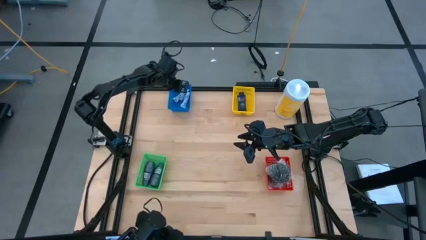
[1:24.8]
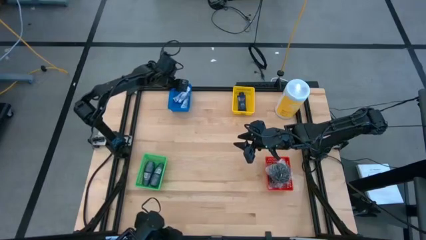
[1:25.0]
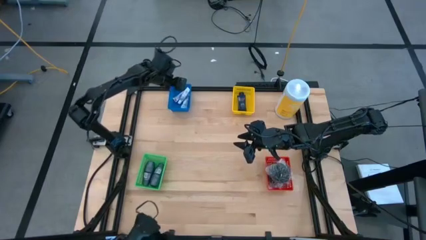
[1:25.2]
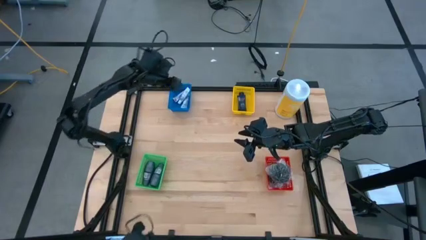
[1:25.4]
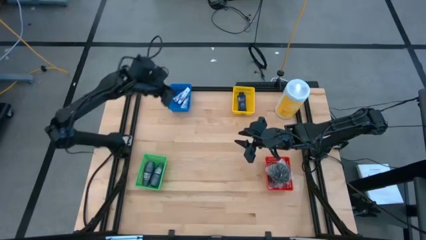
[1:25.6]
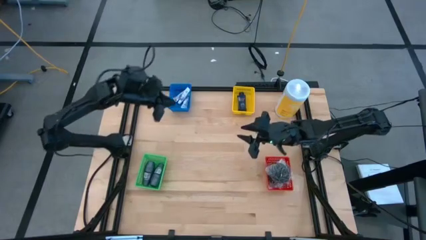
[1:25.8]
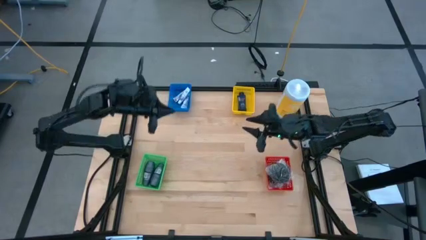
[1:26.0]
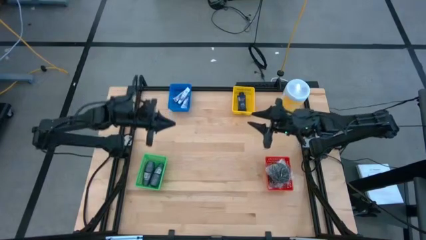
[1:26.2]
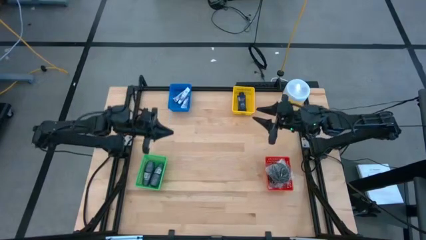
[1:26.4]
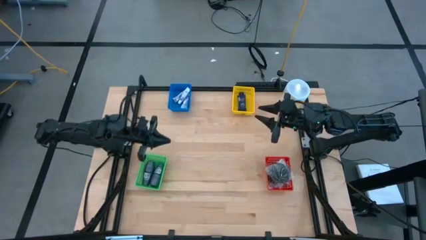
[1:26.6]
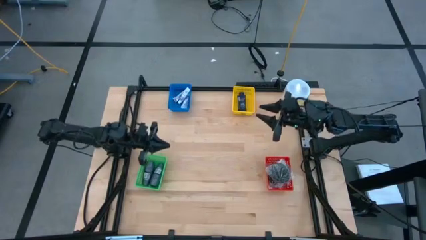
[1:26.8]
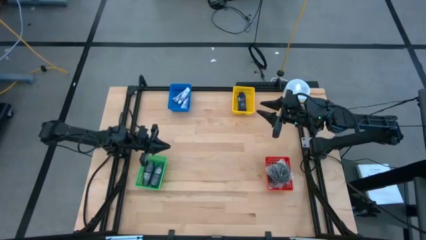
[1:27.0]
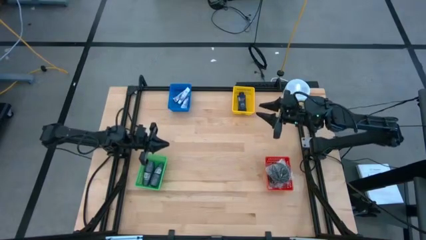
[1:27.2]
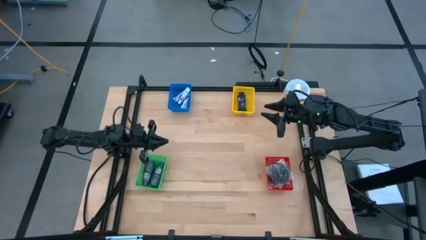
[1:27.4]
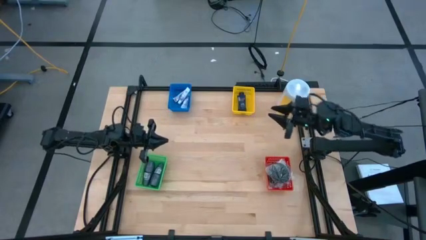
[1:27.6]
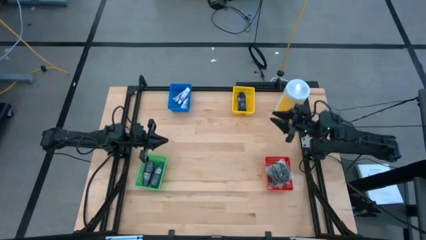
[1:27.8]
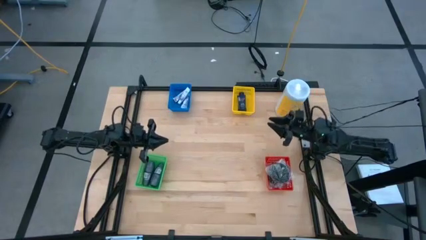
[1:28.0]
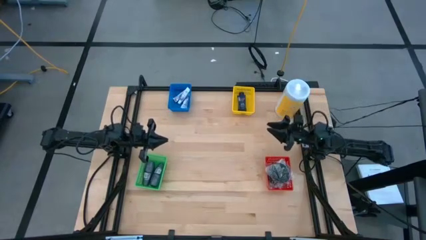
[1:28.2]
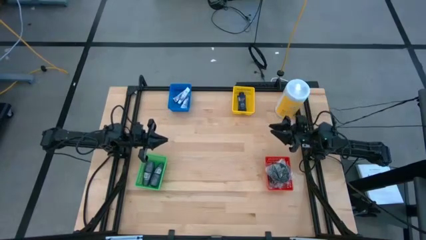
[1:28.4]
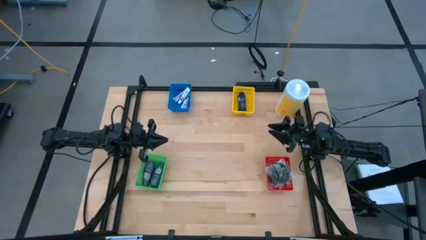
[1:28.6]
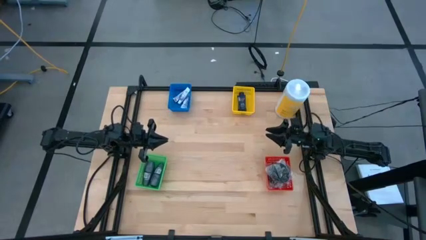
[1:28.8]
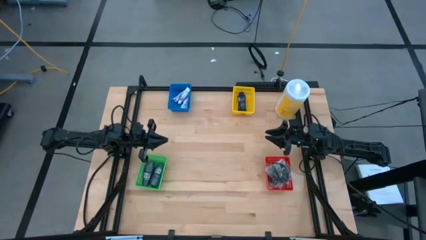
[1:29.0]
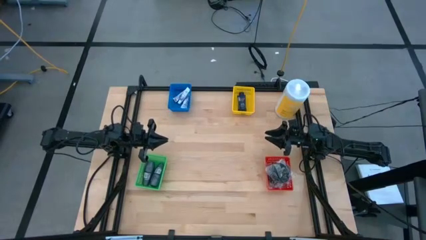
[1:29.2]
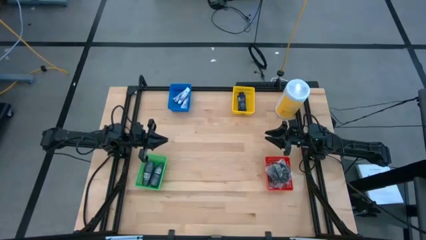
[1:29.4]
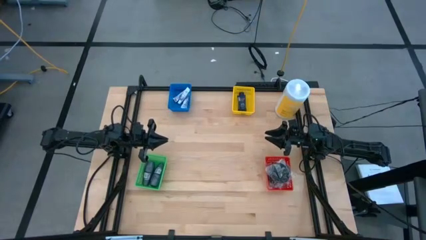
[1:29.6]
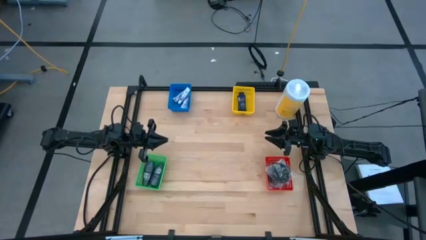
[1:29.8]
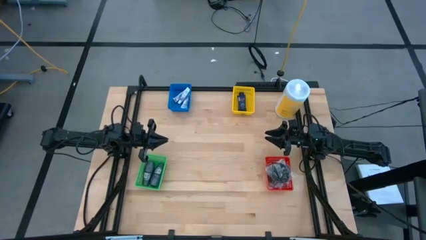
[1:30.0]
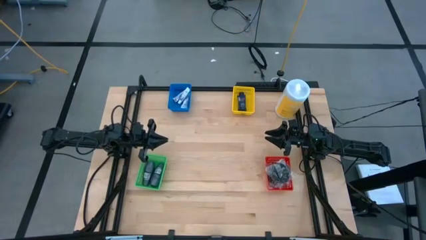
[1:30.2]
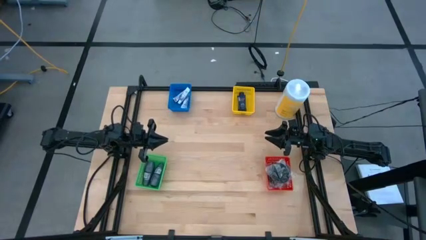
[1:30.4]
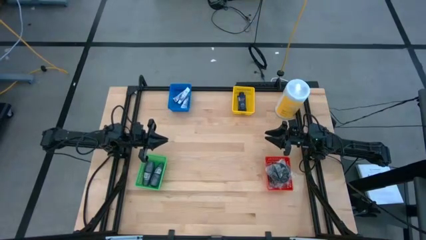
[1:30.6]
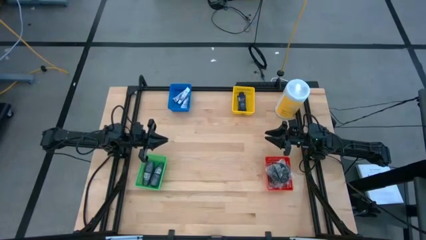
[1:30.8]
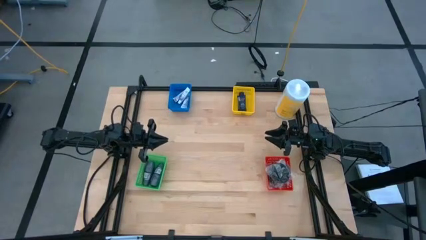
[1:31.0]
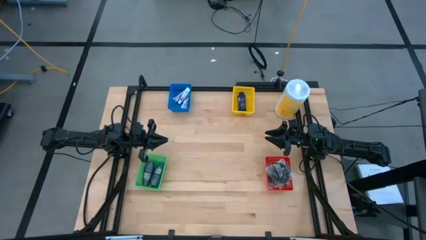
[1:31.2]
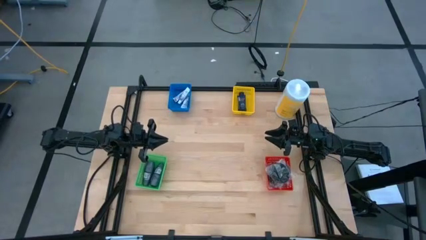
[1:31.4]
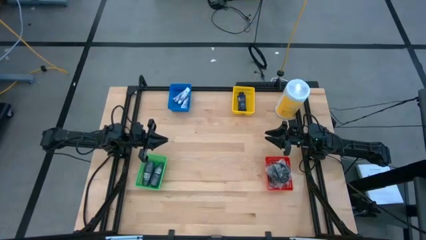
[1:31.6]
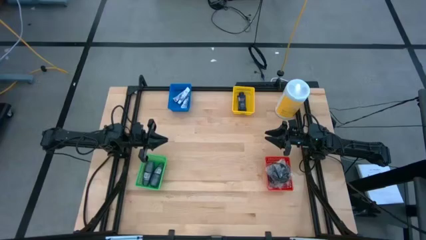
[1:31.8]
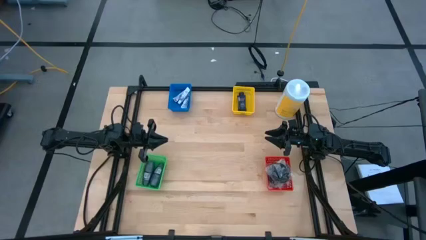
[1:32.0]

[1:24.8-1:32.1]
Task: Pick & Place Travel size toiletries
Return to Home Position

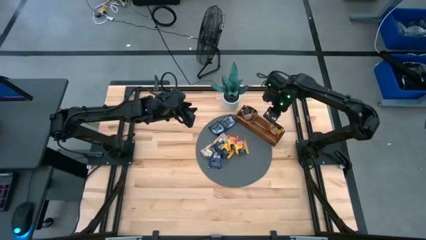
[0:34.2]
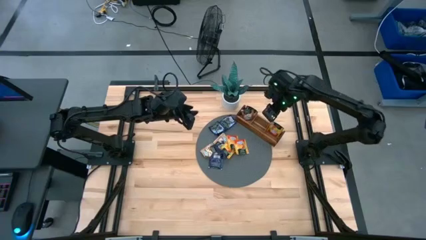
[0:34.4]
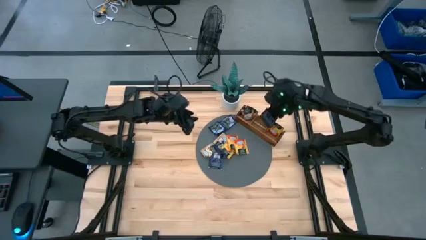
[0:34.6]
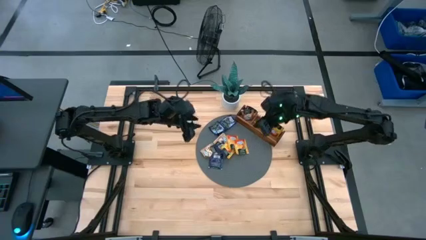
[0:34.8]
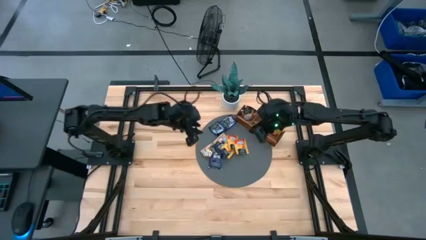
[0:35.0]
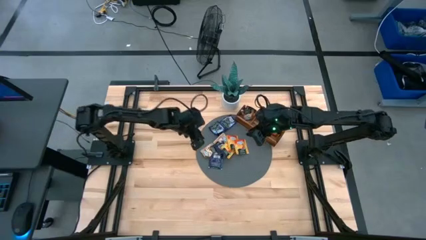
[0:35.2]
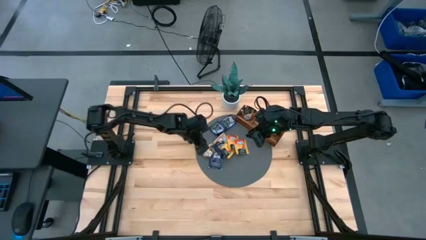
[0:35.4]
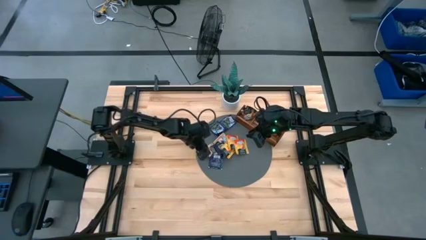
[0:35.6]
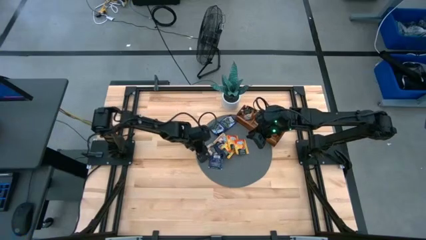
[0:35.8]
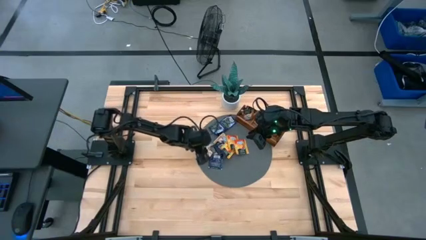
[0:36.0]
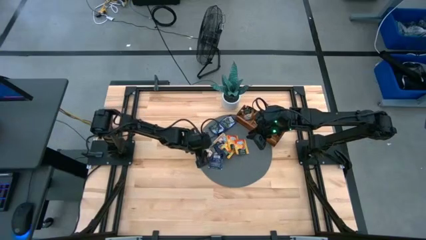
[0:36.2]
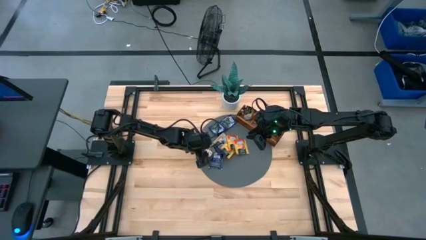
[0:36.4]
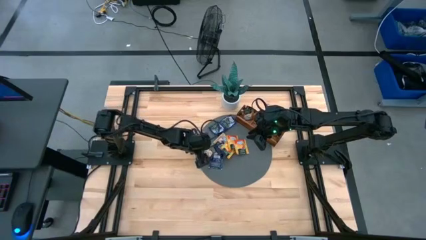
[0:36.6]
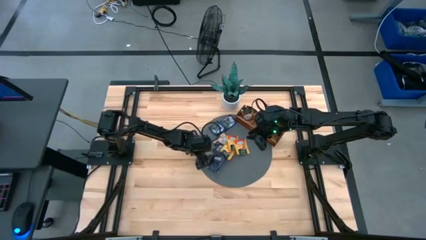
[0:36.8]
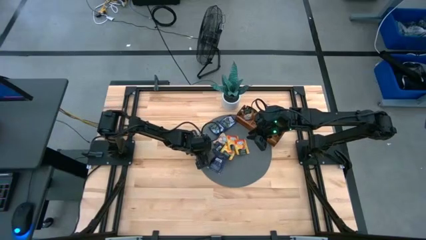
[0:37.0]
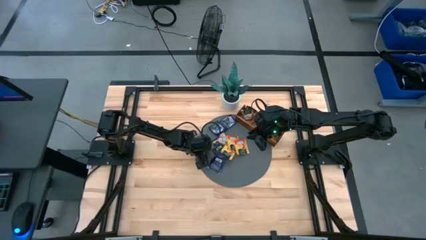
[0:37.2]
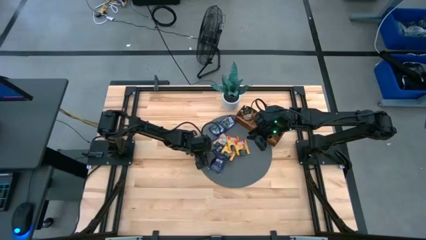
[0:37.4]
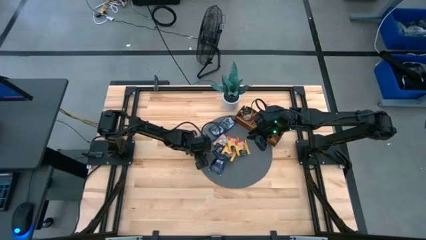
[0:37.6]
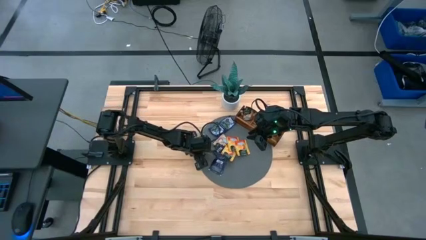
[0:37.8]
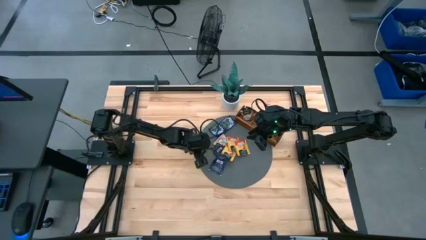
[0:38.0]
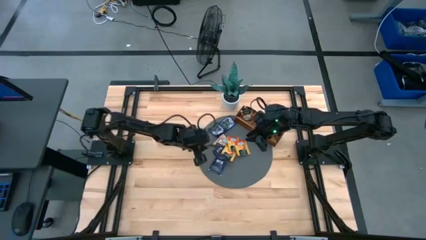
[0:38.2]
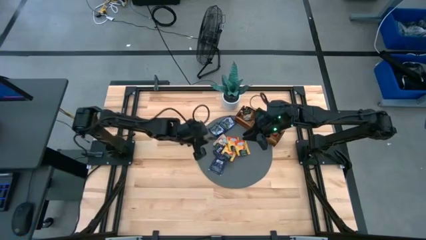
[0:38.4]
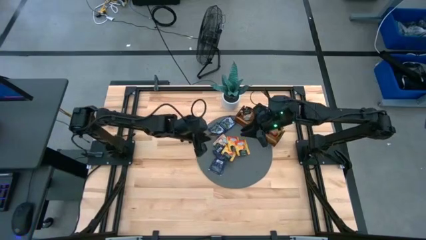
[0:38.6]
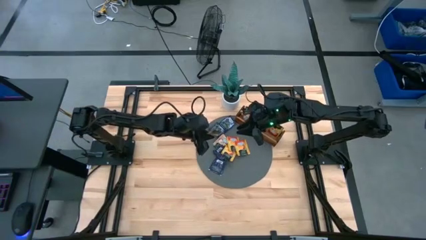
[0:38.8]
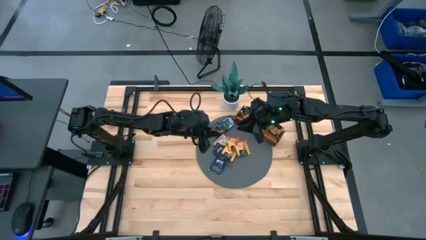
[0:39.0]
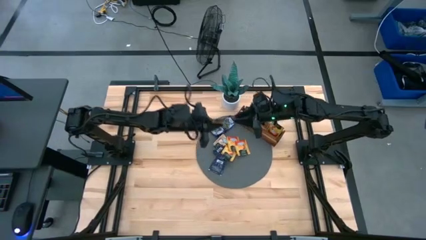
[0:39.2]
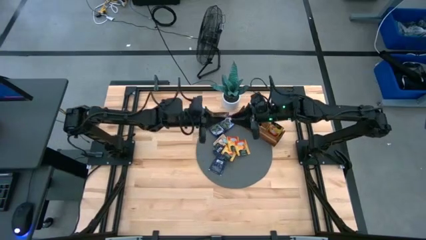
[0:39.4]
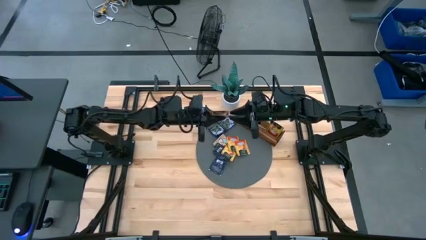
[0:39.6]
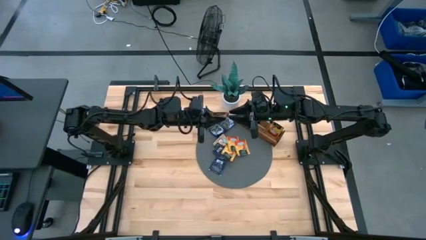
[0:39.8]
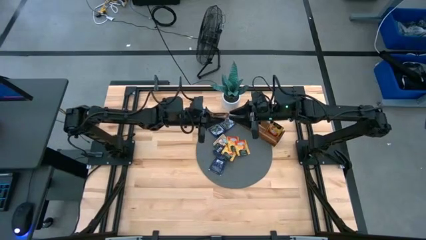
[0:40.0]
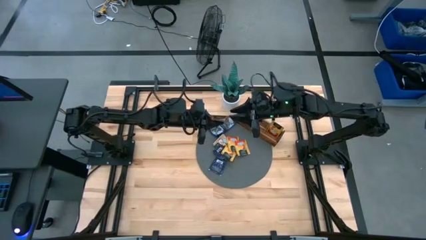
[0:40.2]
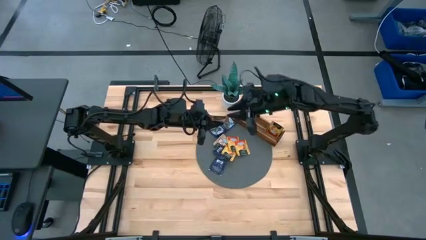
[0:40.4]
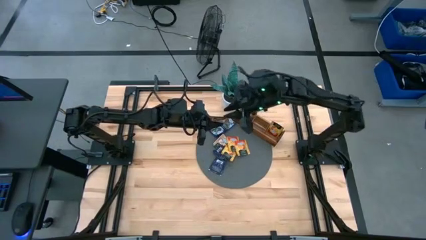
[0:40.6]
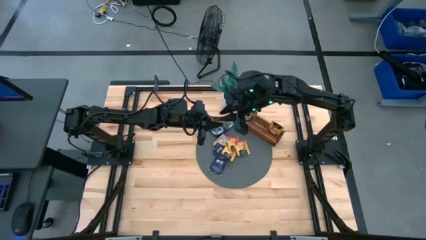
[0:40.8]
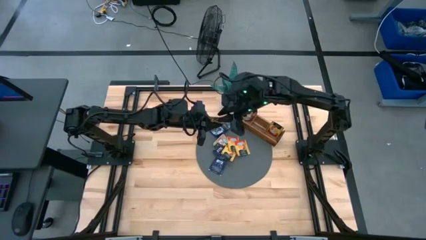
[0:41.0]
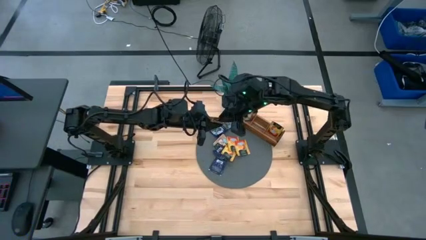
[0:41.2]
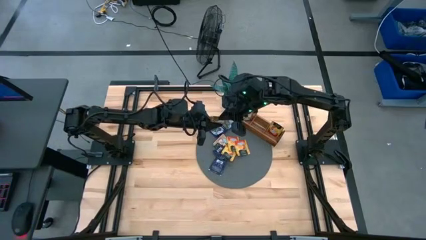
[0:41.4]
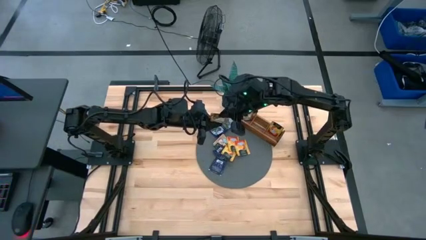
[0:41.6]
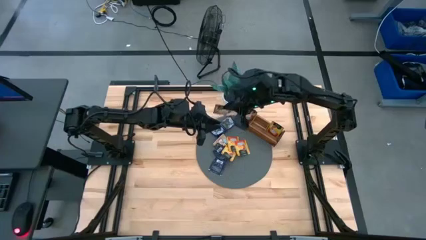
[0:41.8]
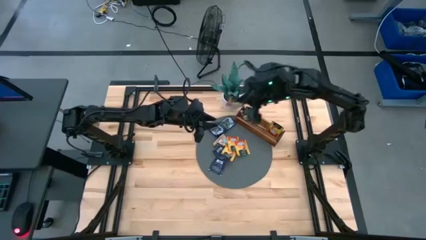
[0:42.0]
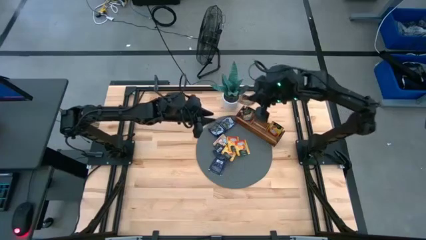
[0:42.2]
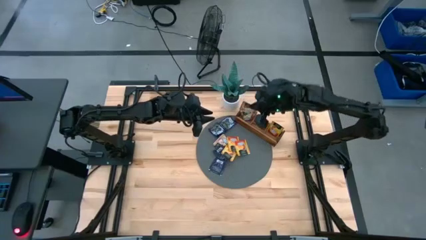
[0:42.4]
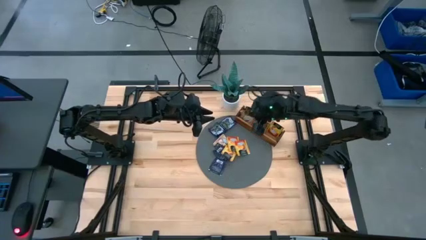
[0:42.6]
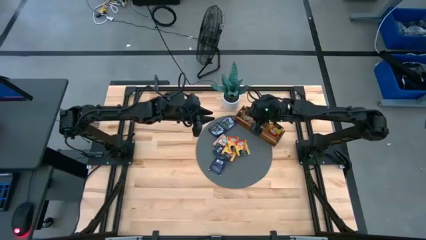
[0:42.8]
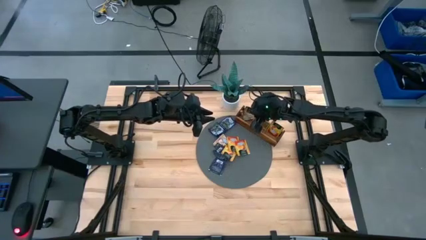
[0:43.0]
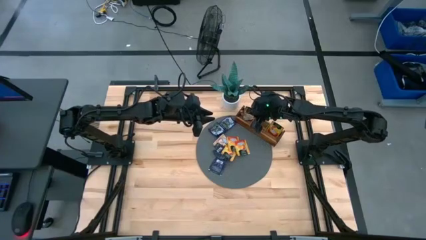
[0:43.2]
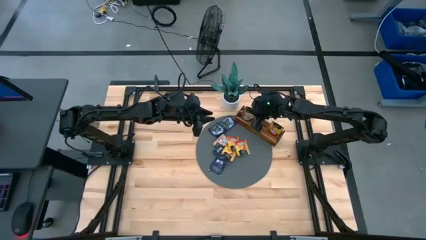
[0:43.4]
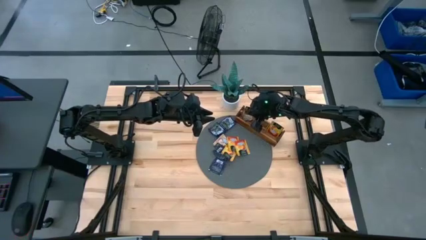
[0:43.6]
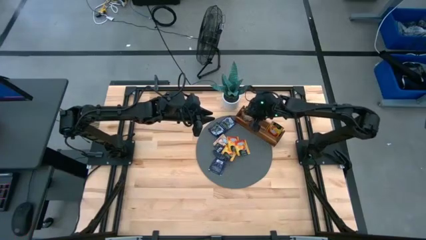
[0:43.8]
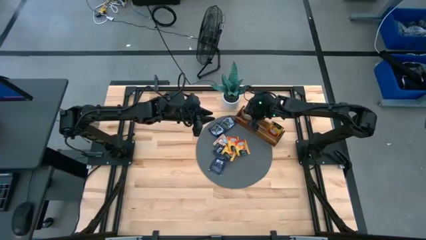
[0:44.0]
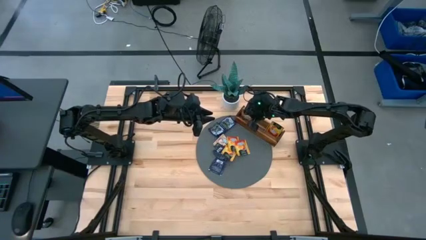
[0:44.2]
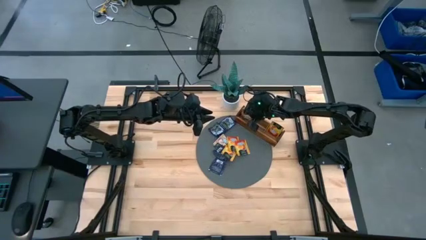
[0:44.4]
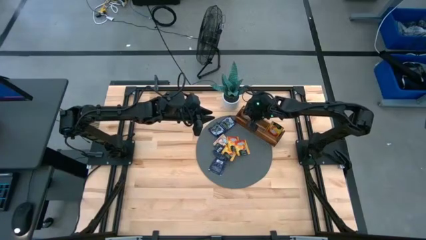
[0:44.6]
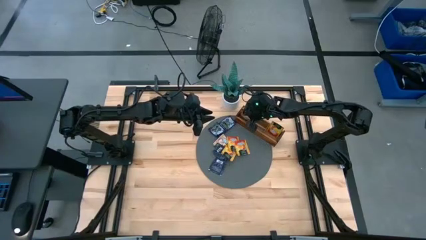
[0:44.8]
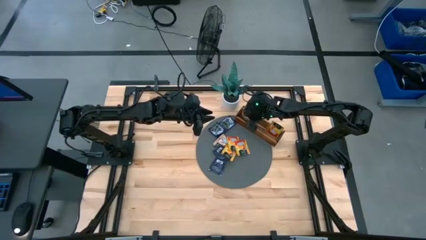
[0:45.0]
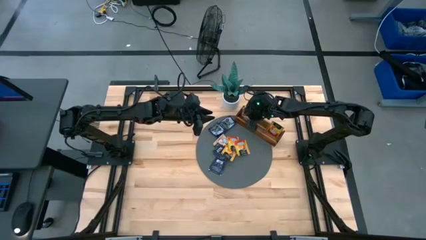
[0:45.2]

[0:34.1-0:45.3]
Task: Pick & Place Tea
Put the brown tea tag into the wooden organizer
